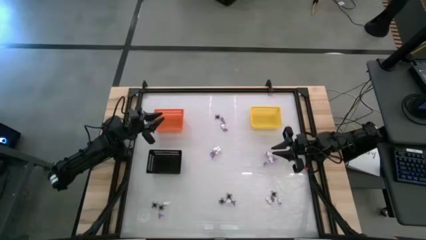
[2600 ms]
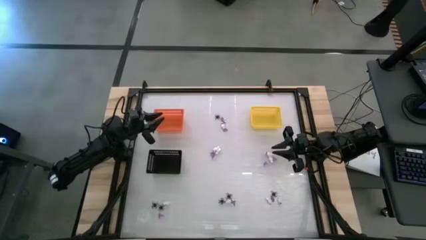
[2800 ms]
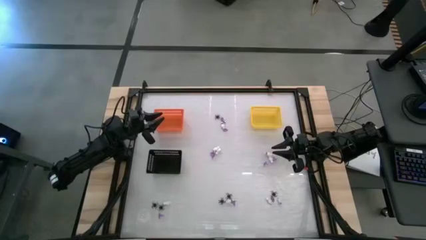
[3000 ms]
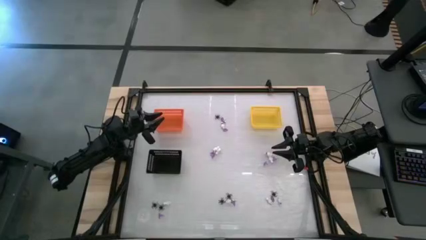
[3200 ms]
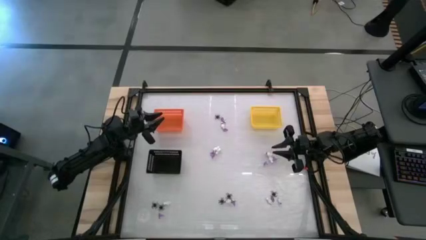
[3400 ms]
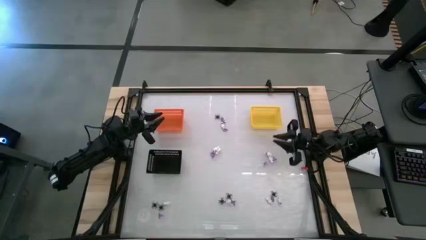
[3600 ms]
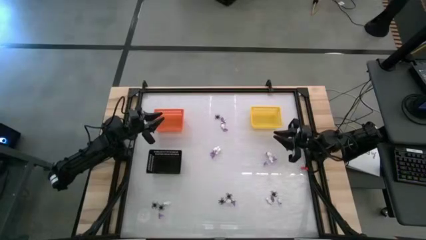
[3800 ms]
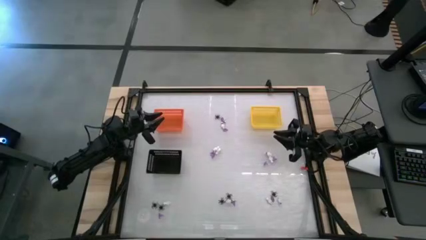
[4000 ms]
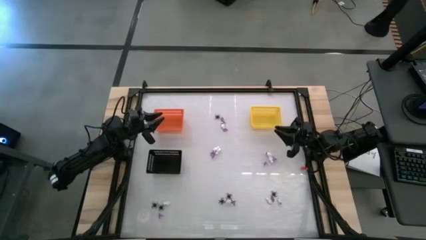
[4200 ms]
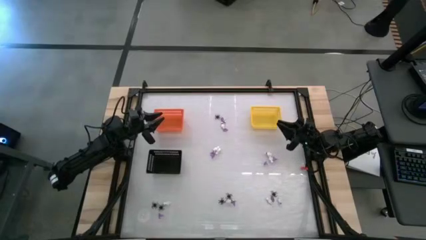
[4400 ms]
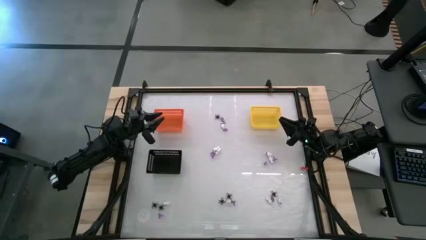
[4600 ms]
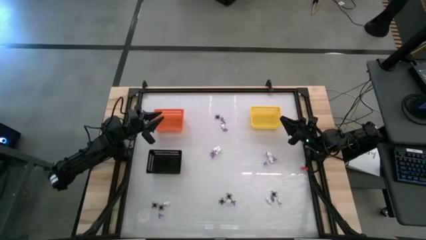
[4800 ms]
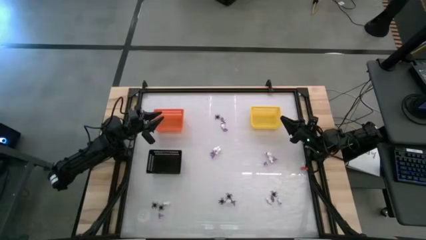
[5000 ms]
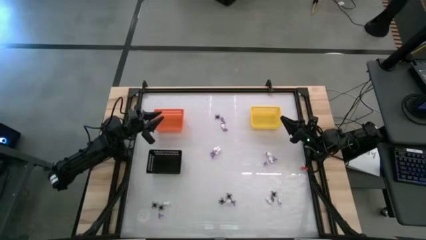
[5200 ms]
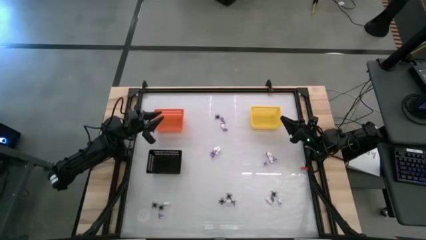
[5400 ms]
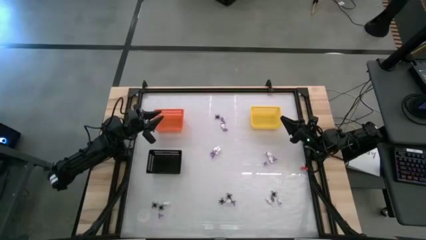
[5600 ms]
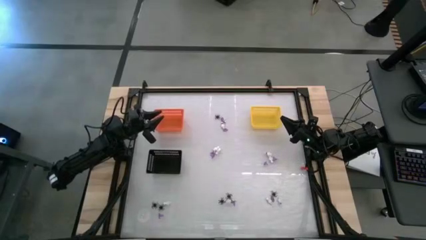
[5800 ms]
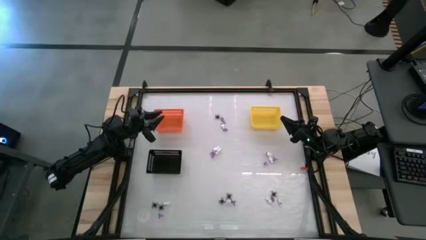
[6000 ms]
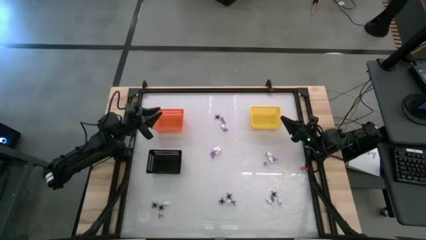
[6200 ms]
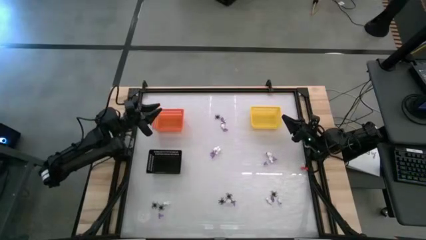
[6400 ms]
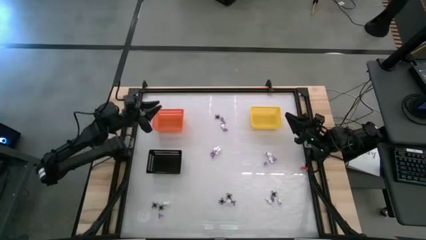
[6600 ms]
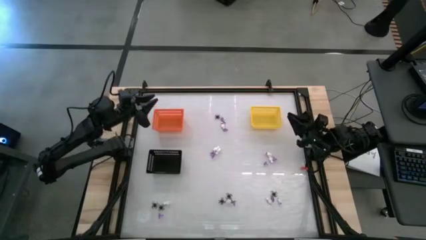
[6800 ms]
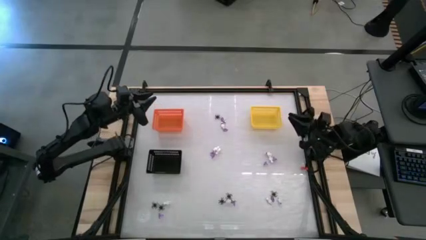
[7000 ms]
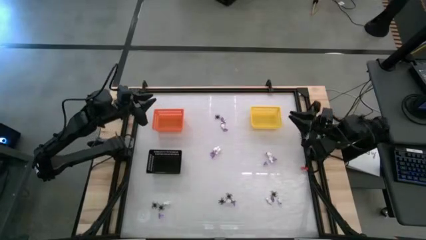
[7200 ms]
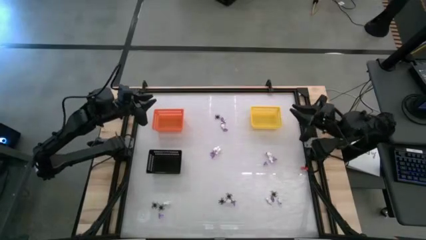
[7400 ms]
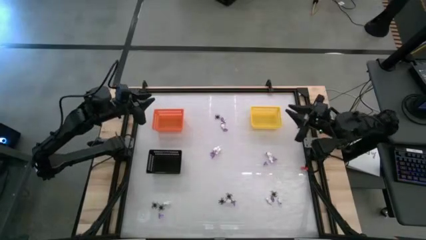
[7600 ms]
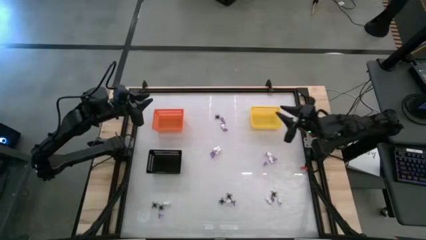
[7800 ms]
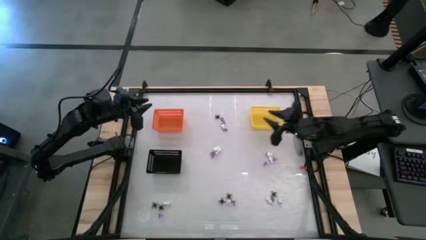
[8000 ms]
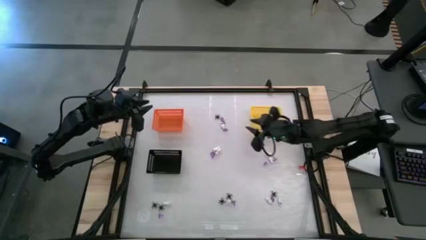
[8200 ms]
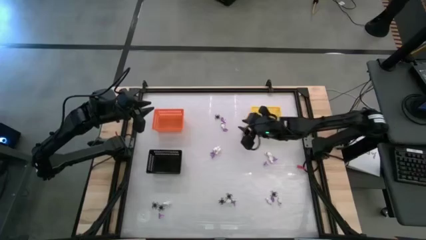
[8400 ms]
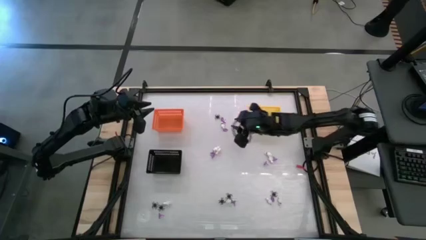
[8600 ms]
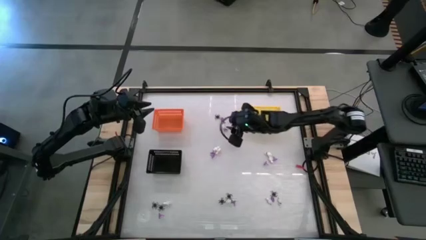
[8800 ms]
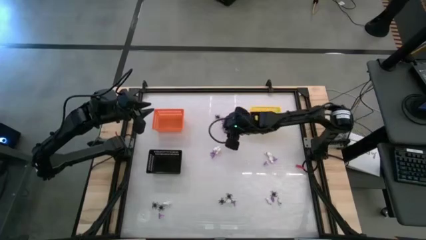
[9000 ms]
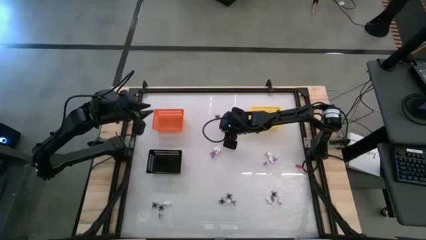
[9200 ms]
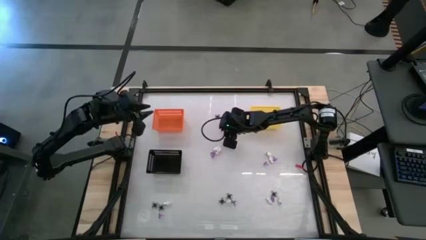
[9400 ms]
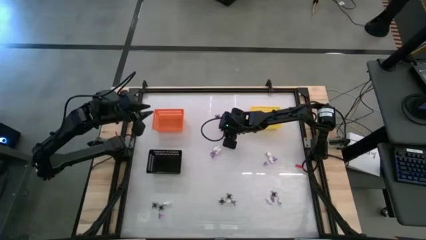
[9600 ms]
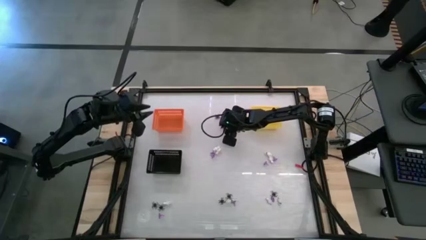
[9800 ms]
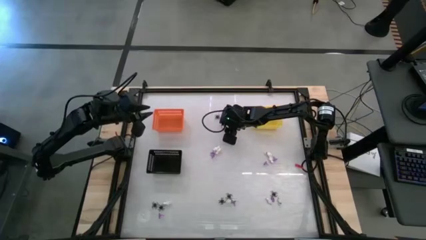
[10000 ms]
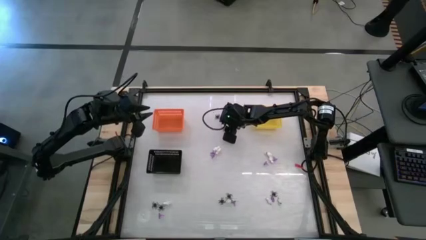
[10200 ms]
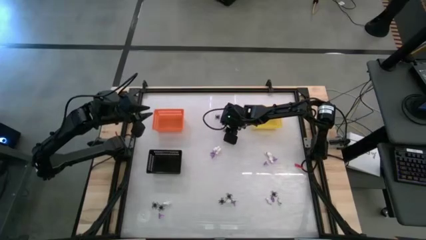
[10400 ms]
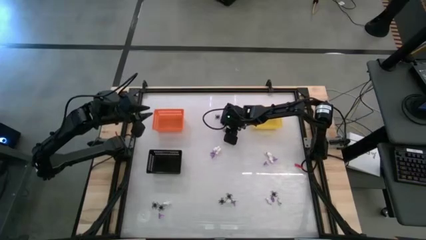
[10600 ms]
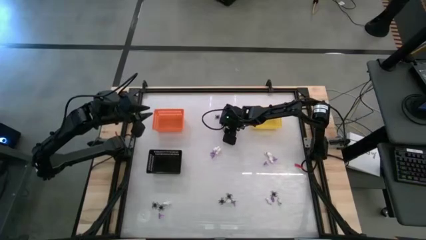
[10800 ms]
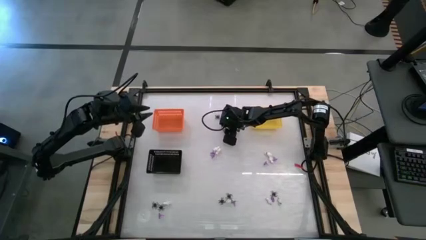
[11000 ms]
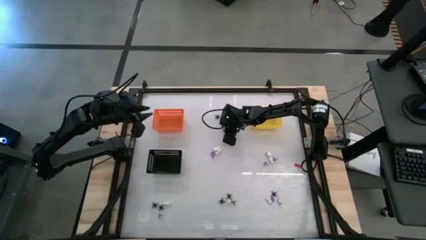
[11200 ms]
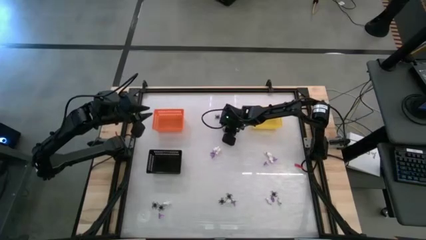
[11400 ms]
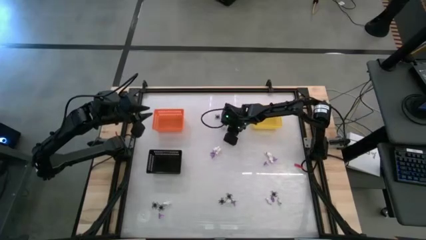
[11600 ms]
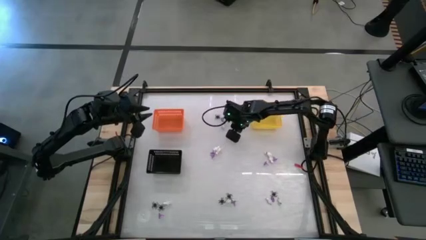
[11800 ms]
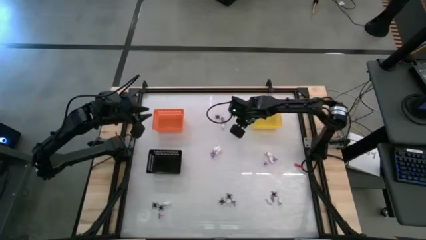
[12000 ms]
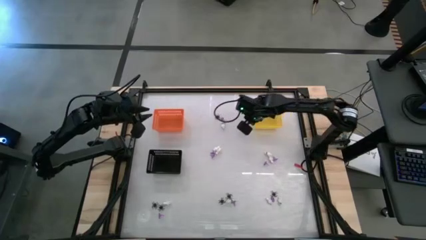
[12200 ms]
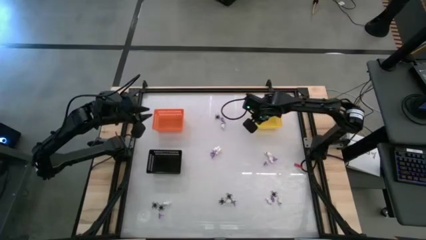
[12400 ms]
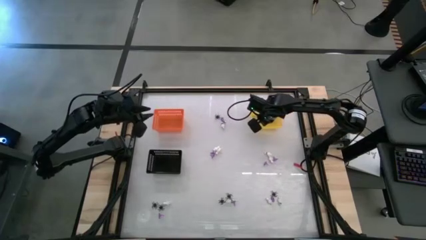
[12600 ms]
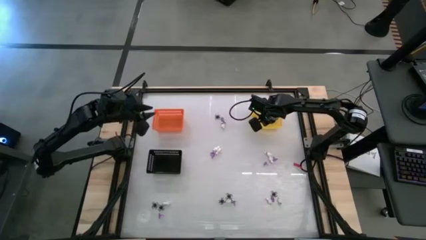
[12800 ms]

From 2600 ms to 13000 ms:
Task: Sort Halloween decoration
Put the violet witch hat into the yellow bin

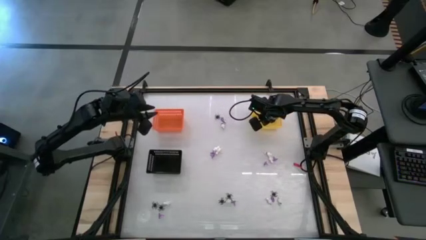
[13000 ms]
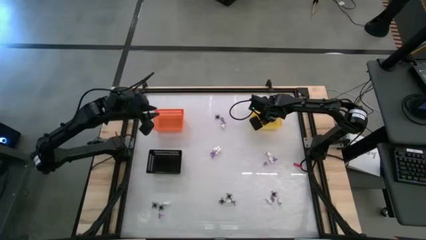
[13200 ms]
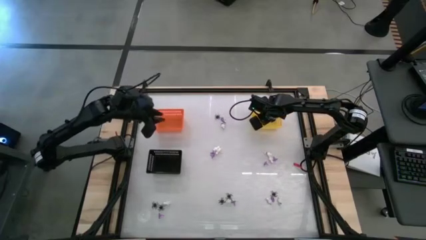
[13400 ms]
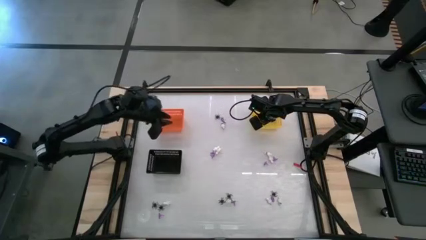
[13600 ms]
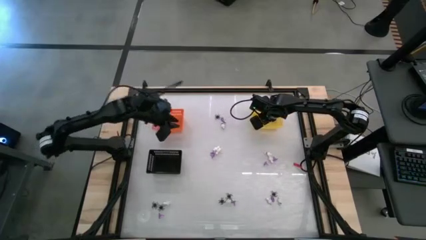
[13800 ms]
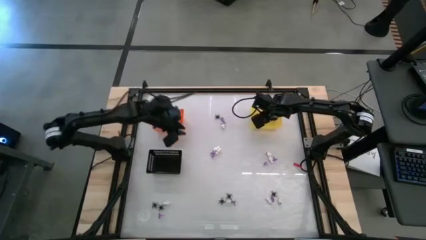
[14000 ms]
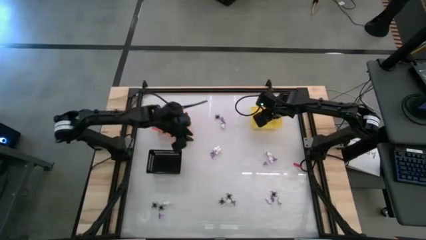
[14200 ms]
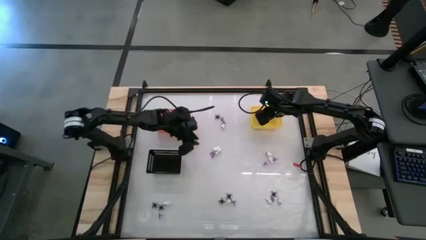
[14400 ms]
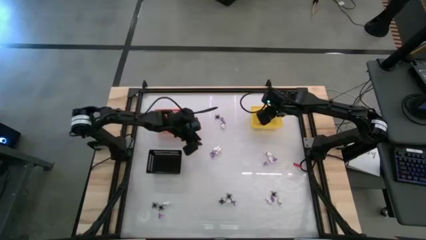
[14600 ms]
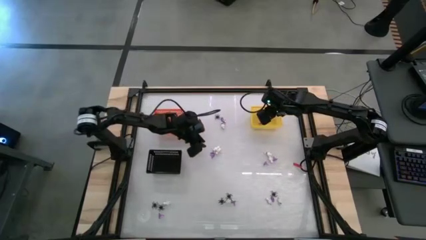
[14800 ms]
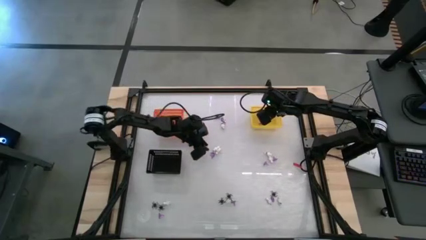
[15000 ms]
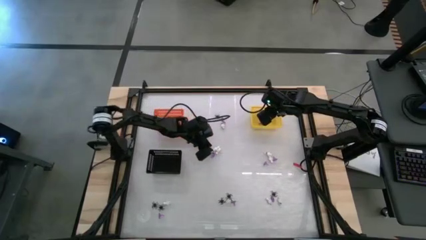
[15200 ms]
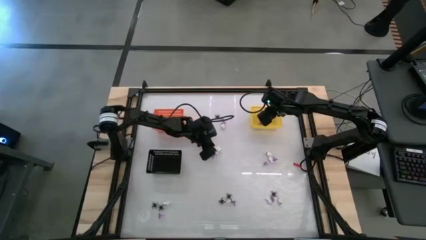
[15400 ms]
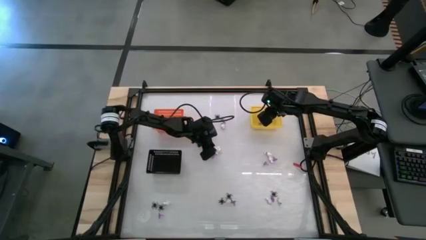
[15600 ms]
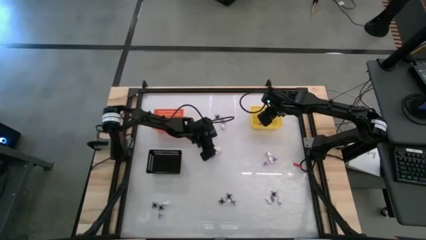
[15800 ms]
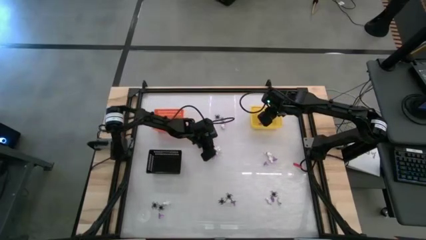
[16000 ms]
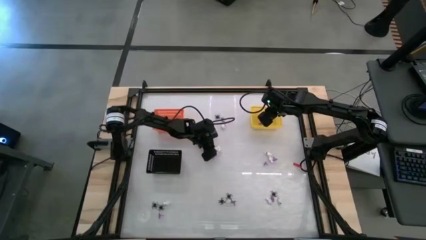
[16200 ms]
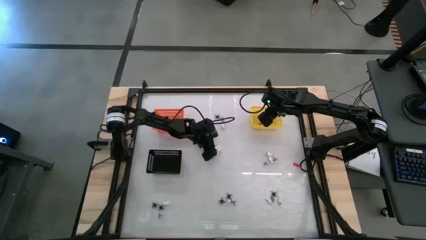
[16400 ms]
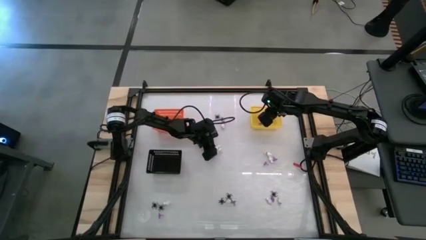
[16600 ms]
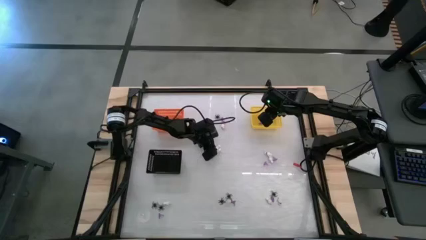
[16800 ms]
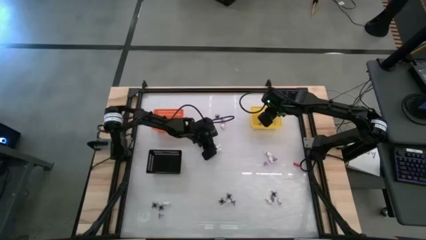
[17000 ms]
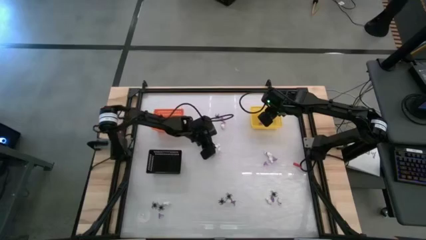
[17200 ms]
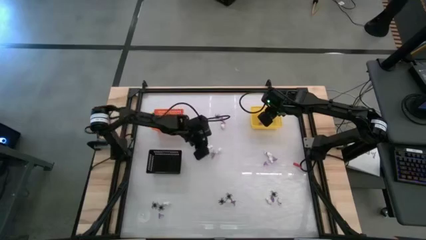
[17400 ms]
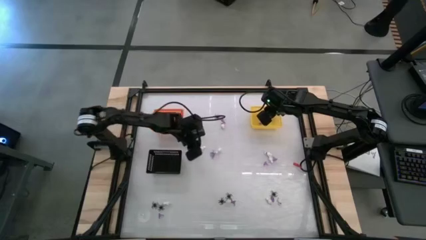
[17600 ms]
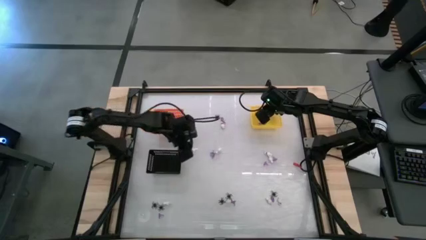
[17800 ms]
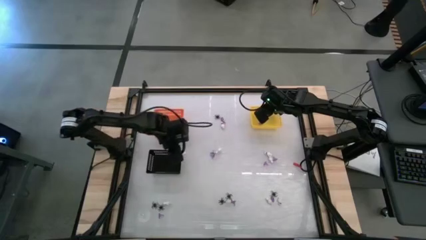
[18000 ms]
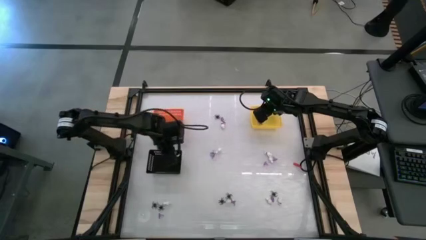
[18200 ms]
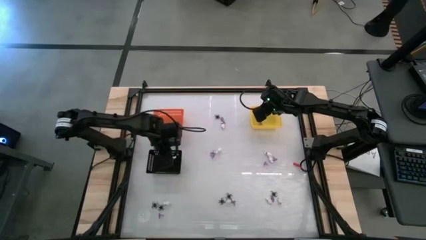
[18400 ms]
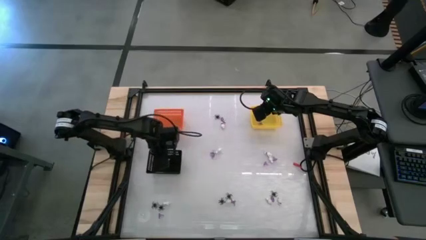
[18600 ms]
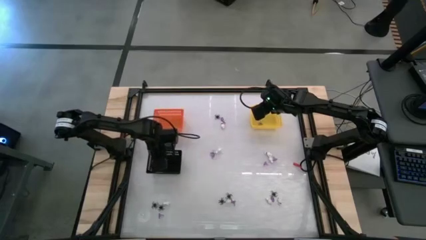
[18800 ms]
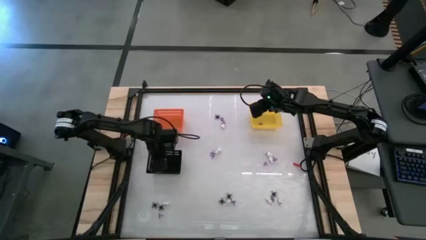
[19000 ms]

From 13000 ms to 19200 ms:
Put the white skeleton toy into the black bin
